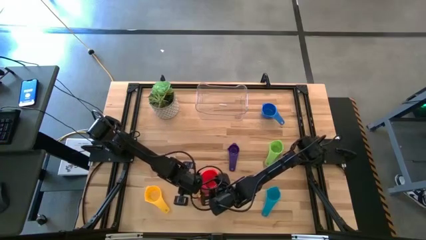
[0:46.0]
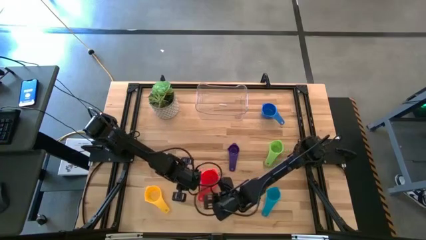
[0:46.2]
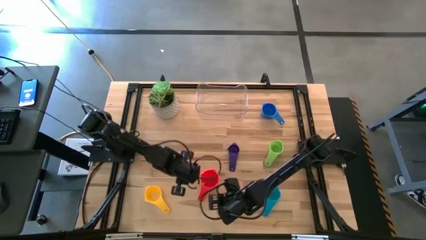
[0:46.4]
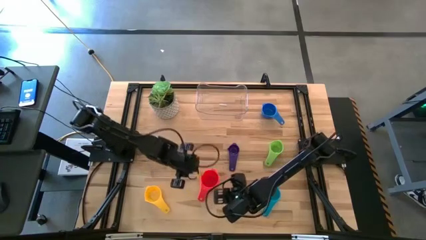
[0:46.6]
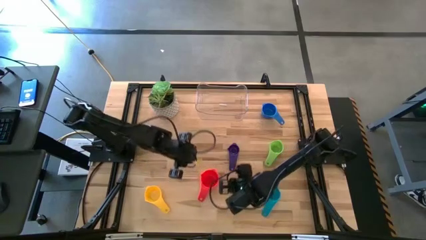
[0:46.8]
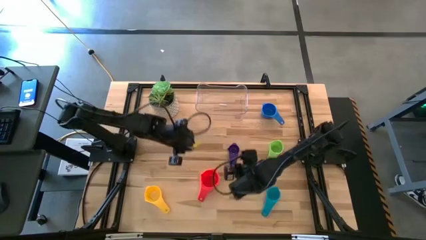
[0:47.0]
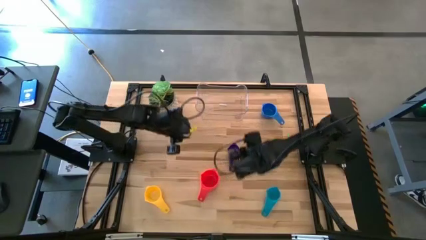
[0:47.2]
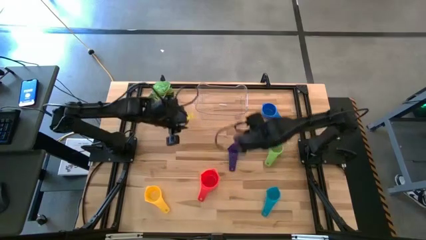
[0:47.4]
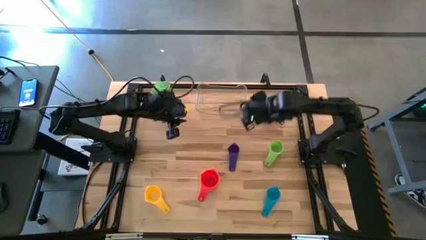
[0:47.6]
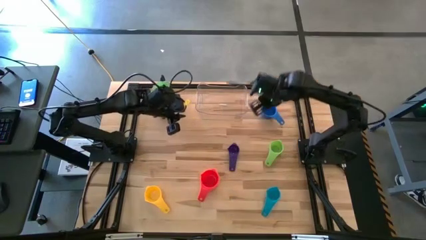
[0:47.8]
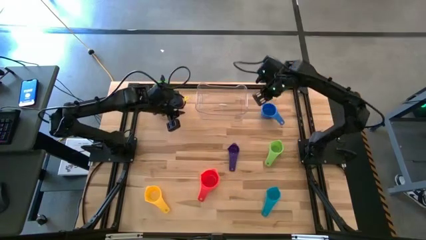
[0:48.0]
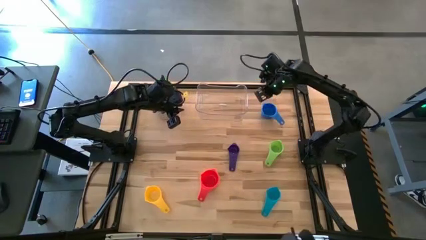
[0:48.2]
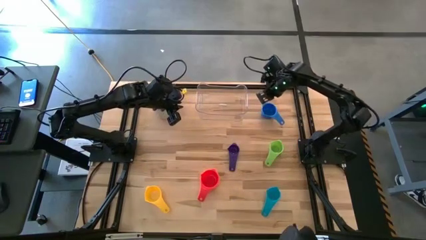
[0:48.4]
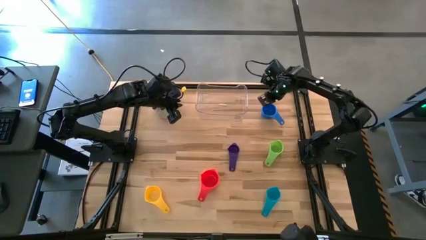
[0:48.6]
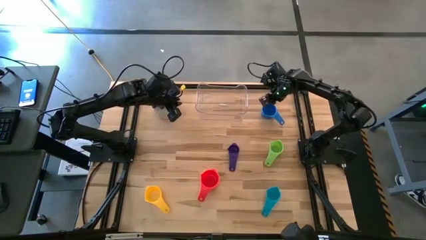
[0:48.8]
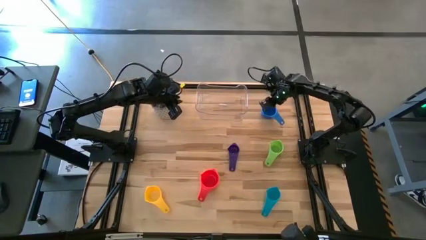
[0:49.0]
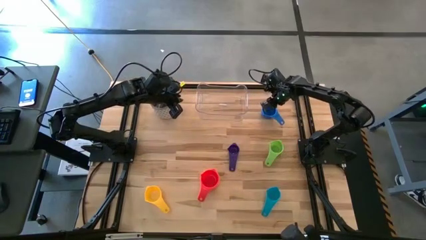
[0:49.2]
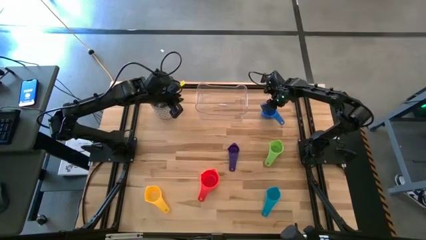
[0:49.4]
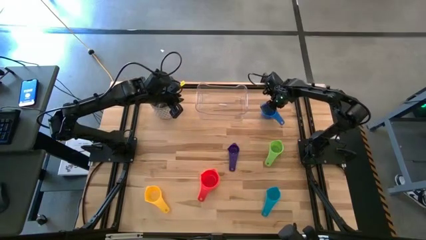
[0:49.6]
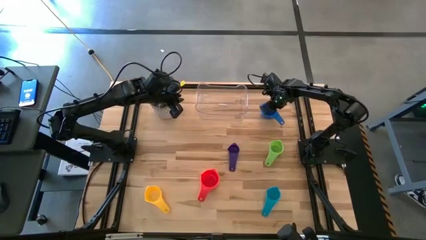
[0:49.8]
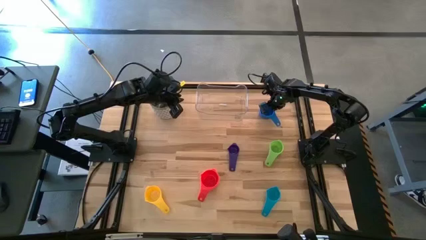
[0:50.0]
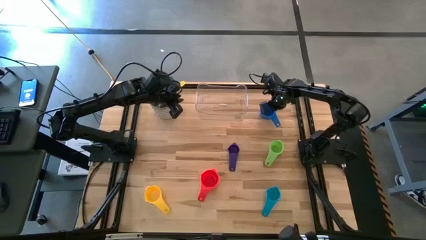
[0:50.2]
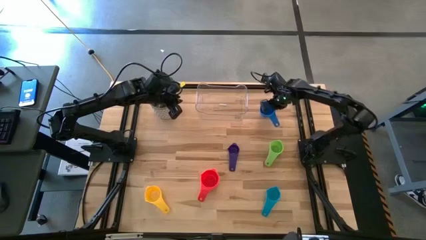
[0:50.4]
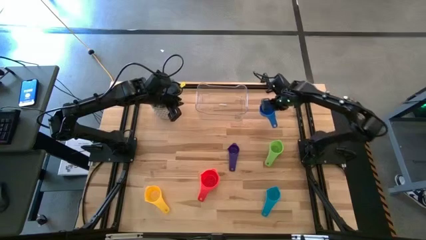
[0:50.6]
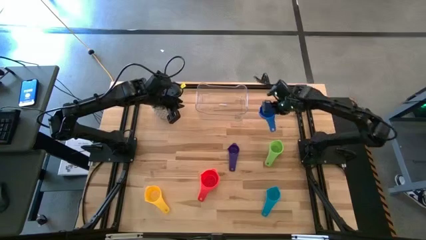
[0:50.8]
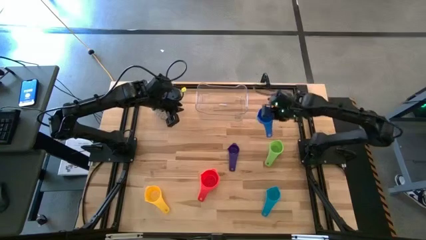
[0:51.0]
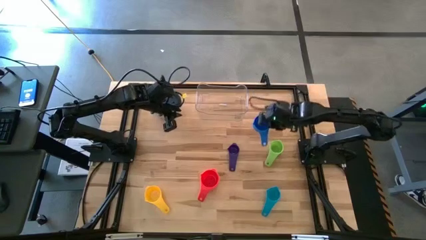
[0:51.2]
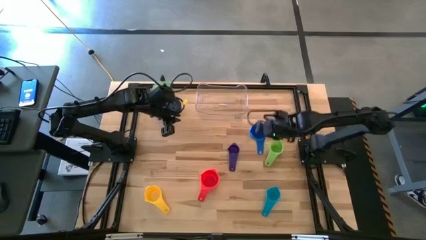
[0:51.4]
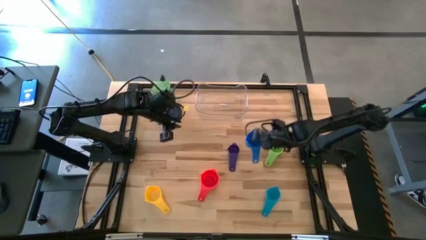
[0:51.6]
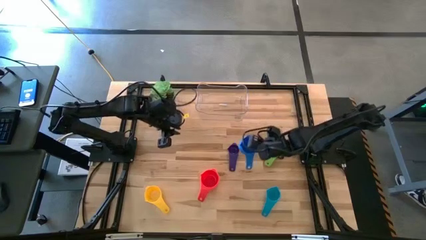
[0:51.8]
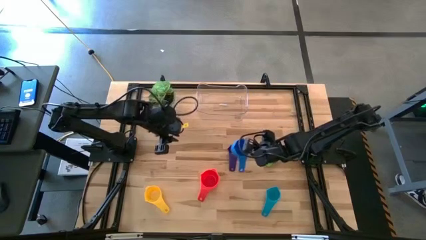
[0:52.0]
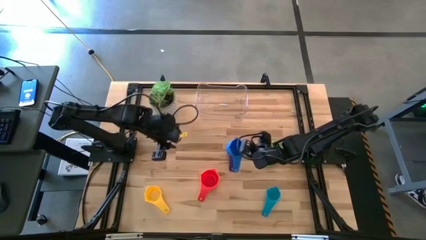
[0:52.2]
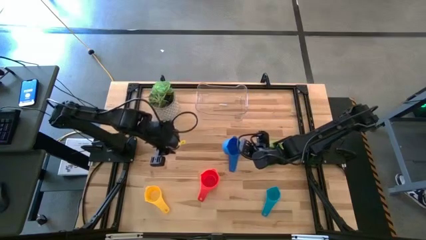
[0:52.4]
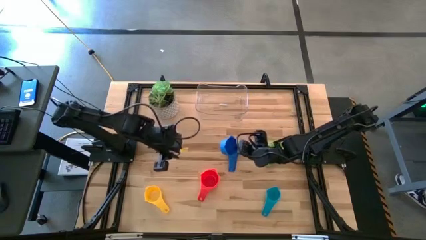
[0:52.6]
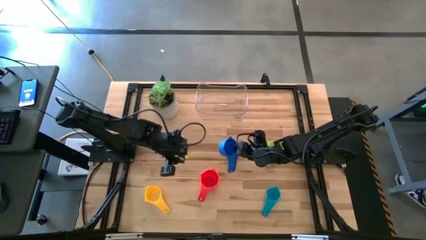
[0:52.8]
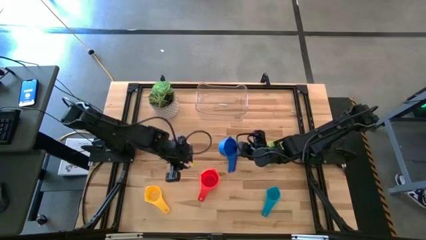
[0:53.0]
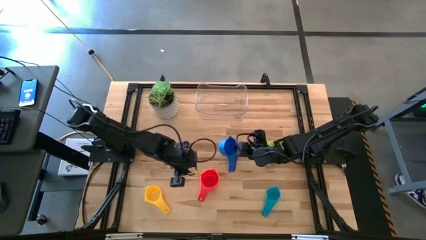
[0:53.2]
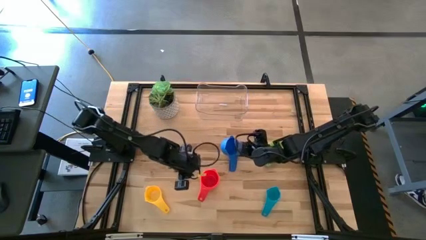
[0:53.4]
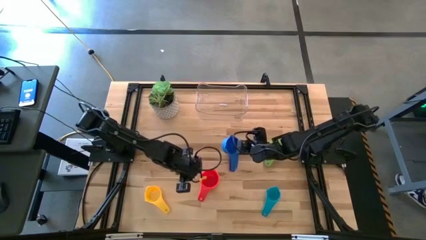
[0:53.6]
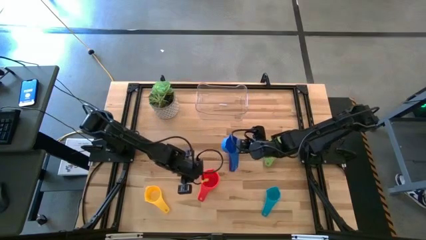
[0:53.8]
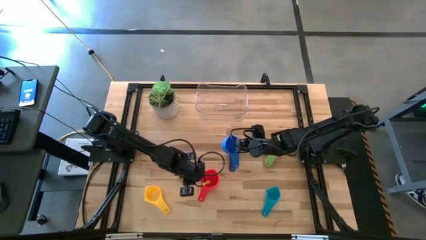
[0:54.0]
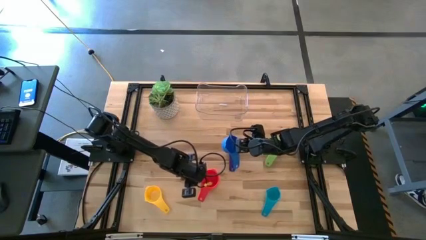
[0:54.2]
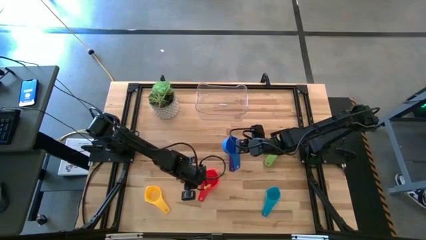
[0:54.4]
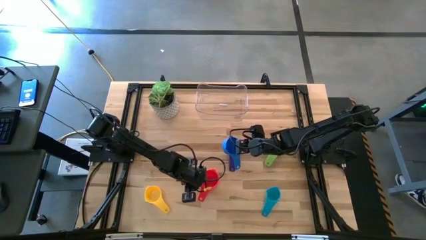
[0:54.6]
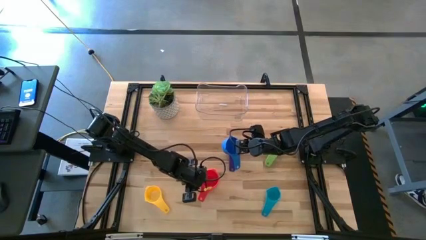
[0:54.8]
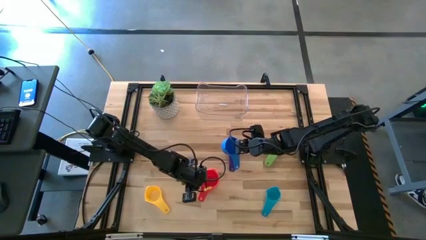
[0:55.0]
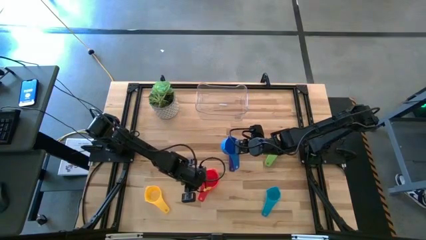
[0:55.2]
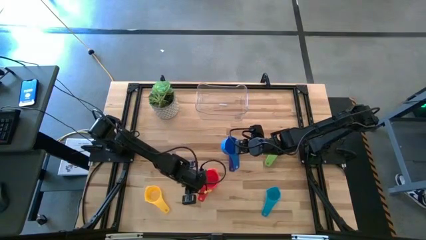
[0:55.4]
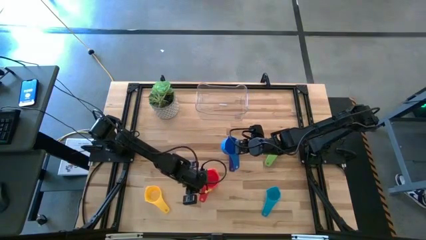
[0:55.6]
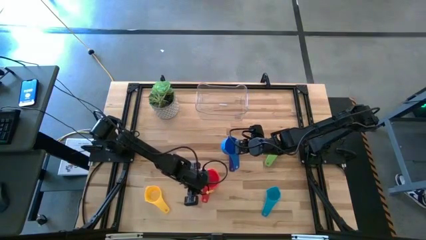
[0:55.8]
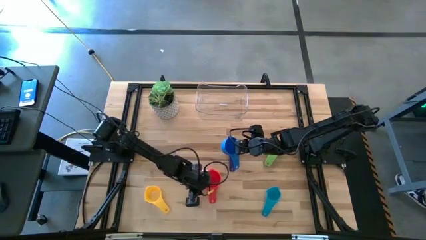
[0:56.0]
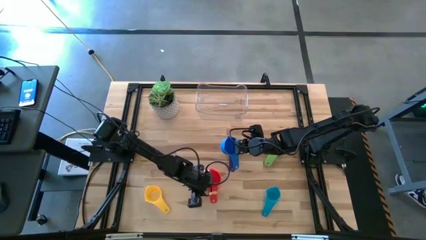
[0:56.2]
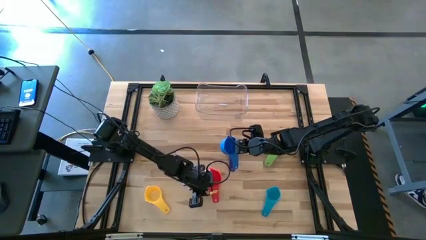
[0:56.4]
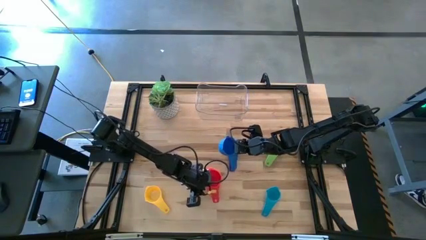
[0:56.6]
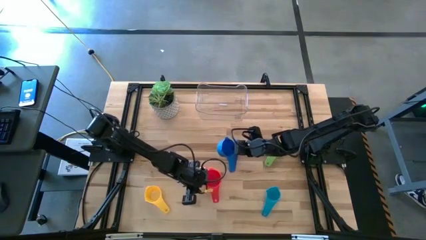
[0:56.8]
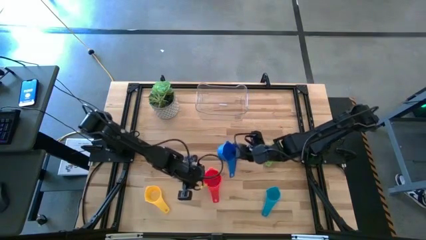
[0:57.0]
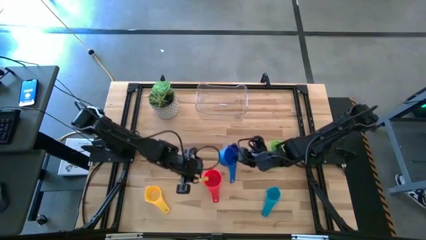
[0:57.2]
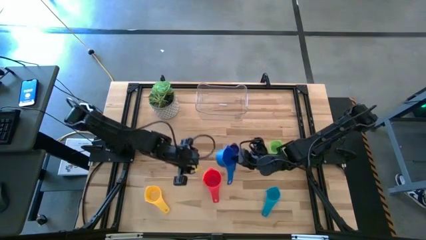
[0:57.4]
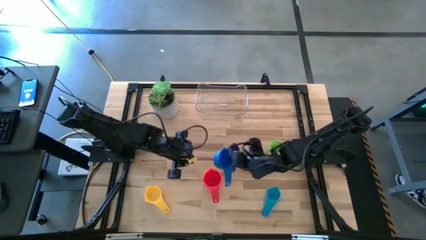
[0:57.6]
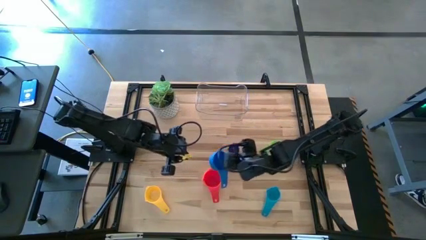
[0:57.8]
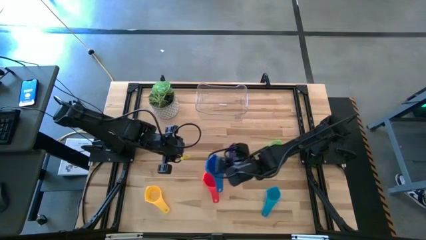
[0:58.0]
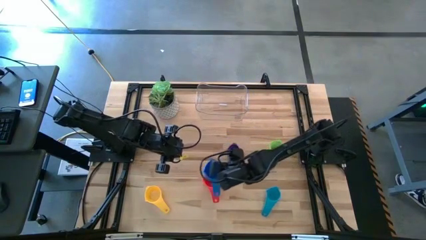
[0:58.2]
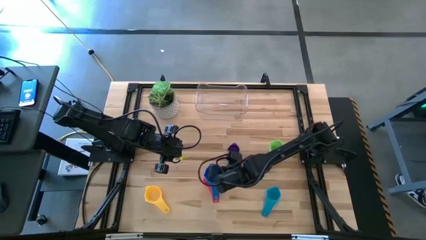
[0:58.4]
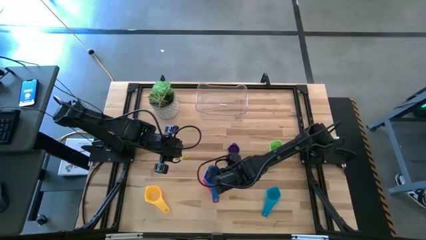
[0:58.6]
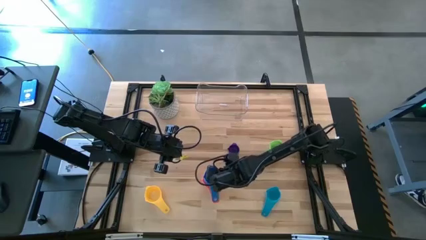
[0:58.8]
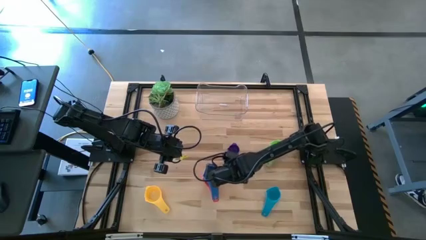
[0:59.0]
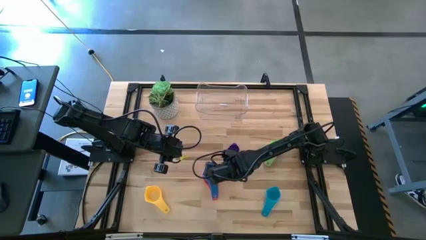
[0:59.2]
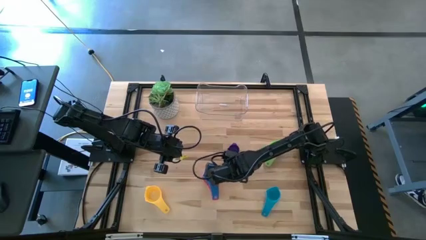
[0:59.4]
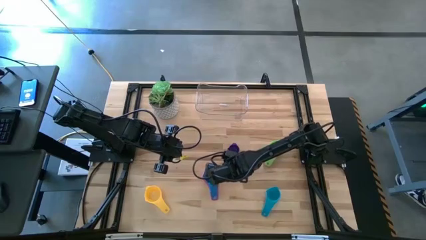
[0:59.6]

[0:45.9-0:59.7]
Task: Nest measuring cups in basket
Stack the top light blue measuring cup into the red measuring cup

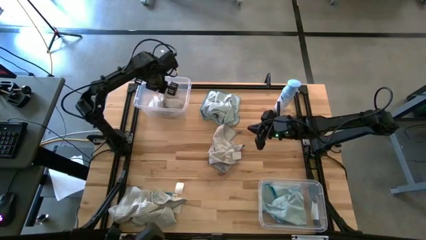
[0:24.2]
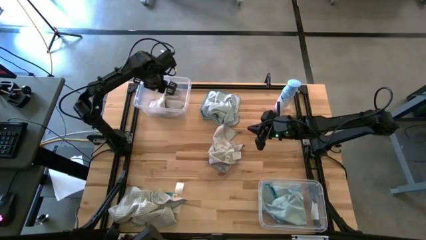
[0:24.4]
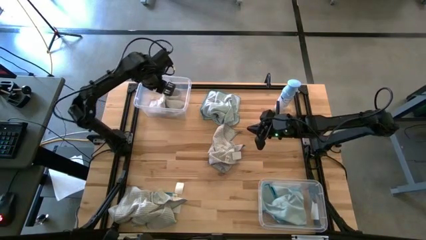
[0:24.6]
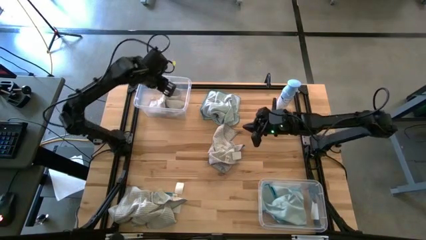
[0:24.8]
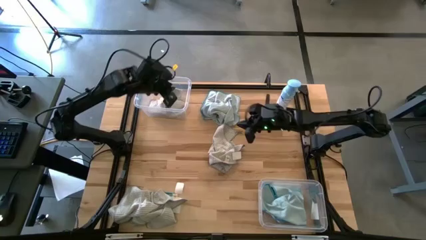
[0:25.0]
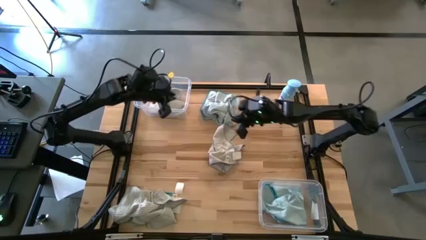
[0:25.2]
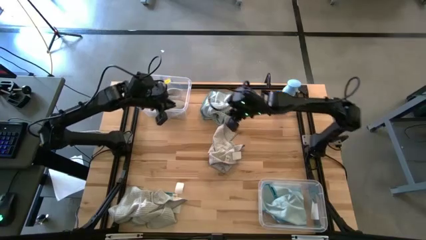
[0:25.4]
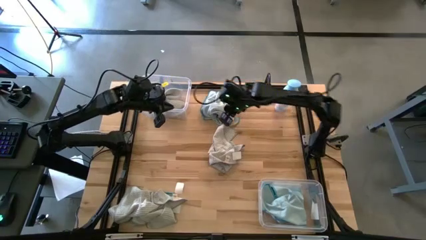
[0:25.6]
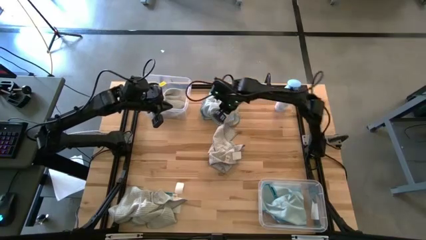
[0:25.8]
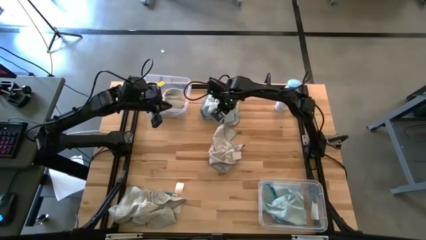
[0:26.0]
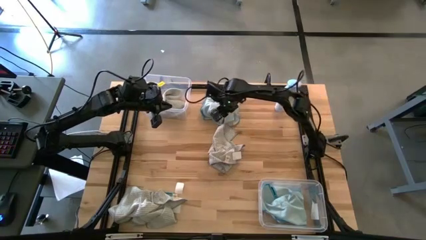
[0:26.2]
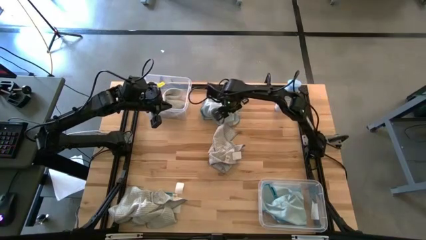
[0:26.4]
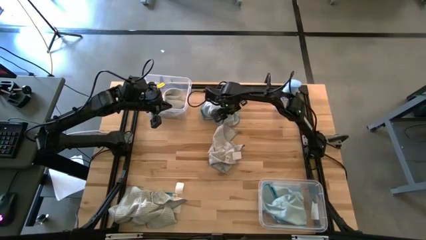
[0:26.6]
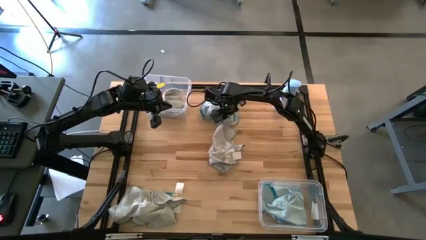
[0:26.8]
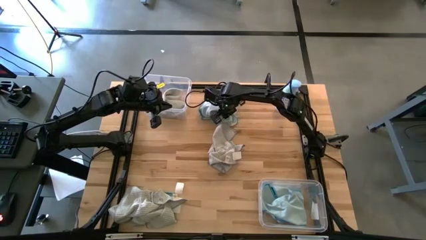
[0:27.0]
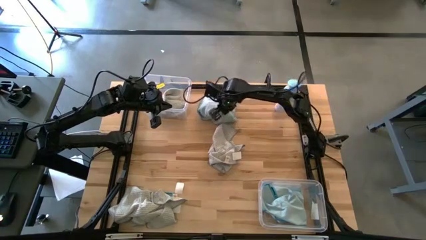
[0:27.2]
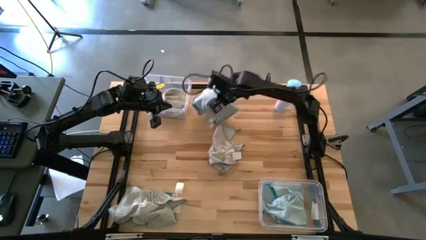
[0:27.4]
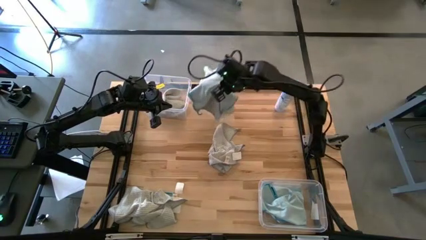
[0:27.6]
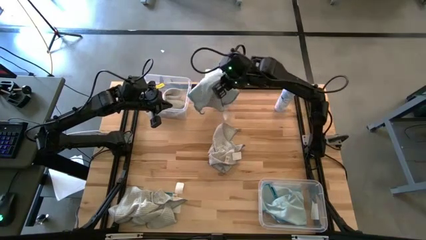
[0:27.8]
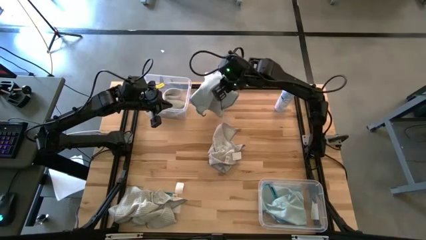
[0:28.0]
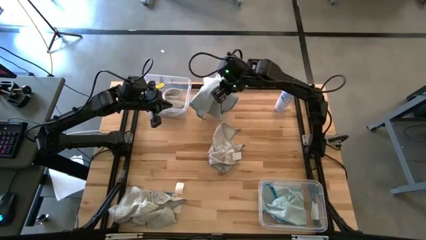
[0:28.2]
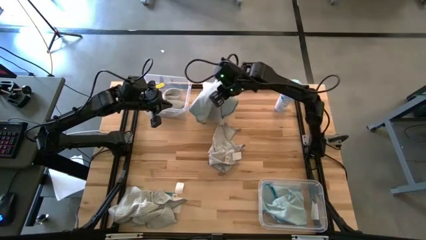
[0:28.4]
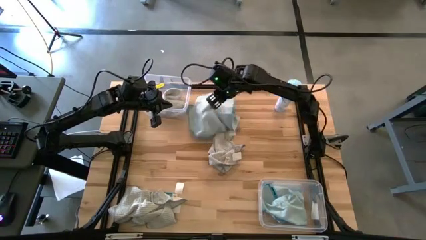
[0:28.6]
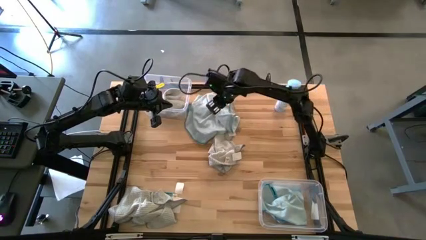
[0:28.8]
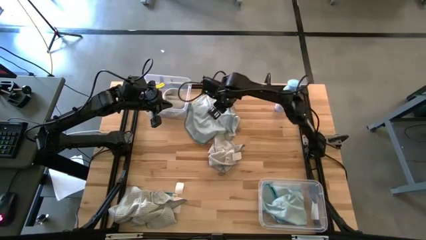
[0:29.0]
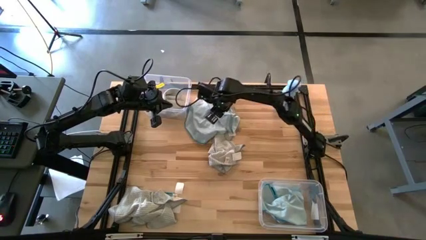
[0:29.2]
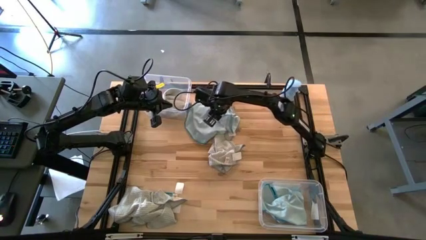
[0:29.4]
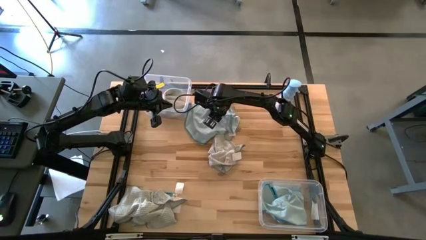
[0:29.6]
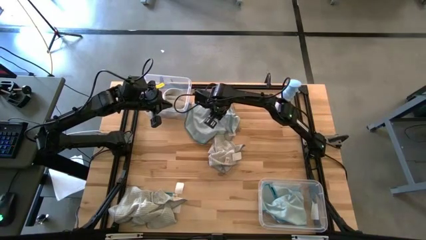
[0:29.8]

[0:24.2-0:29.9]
Task: Sort microfiber towel by color & place in baskets
Put the top blue microfiber towel into the bottom transparent bin
